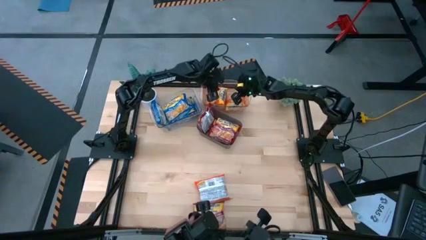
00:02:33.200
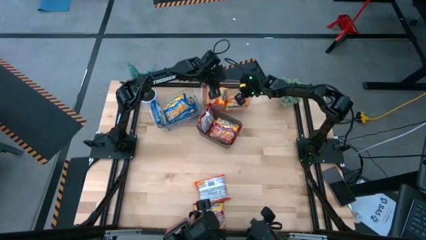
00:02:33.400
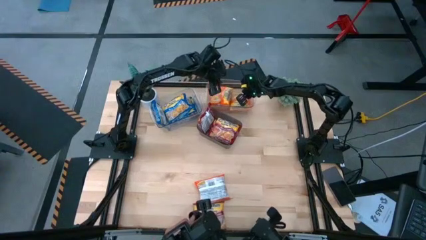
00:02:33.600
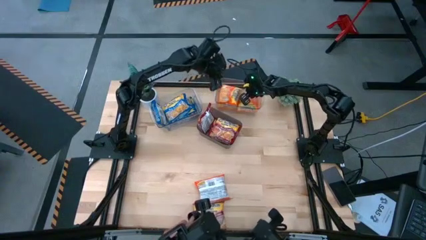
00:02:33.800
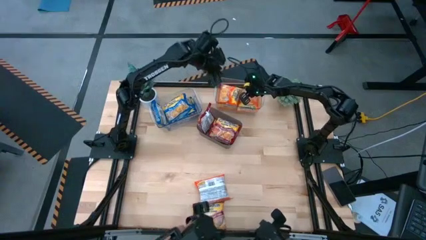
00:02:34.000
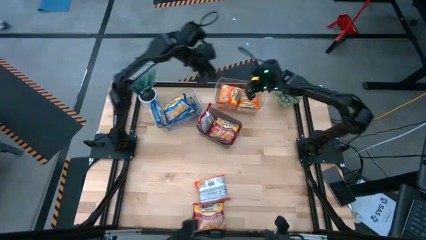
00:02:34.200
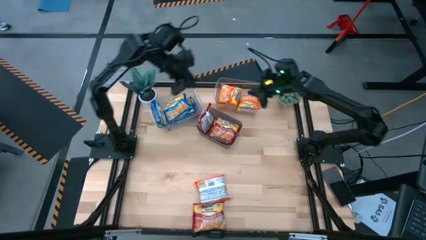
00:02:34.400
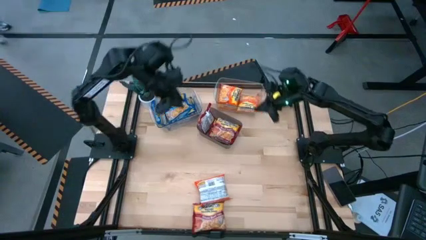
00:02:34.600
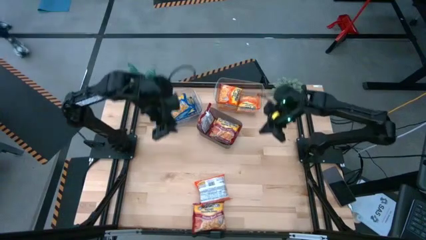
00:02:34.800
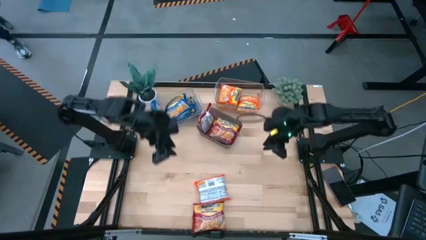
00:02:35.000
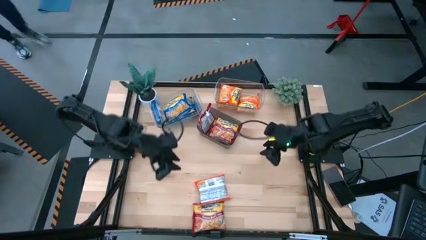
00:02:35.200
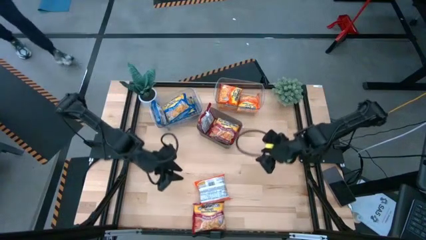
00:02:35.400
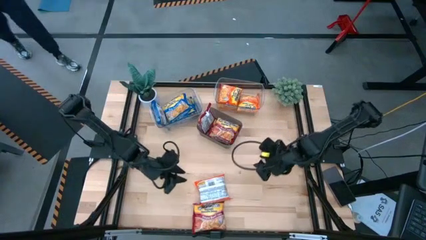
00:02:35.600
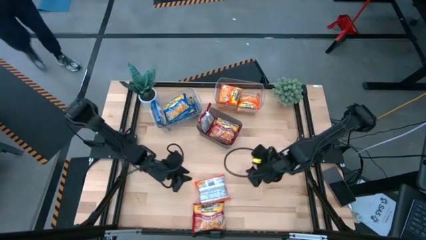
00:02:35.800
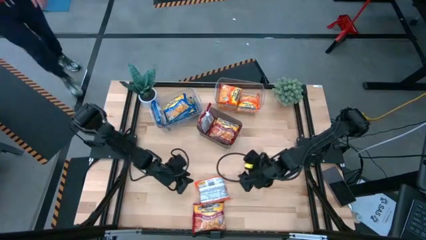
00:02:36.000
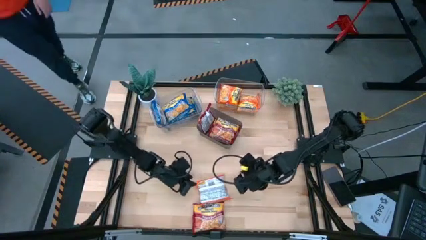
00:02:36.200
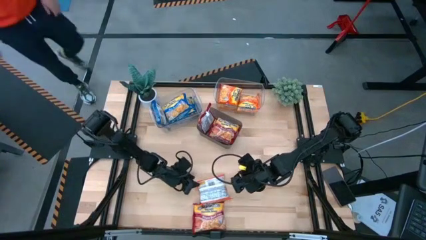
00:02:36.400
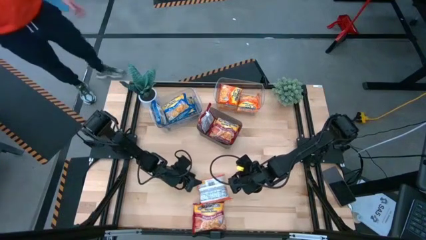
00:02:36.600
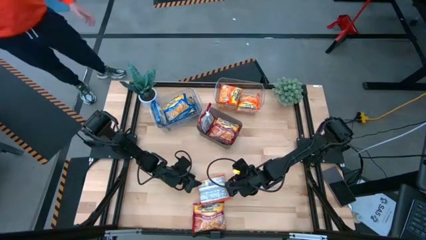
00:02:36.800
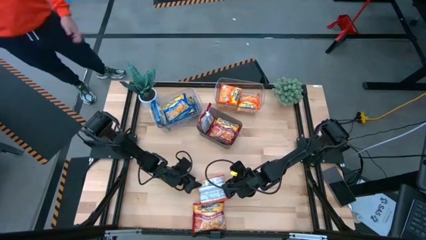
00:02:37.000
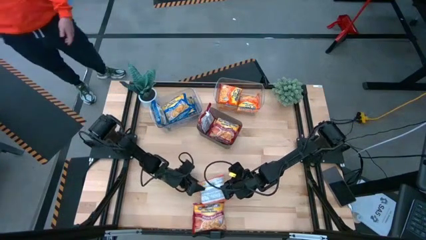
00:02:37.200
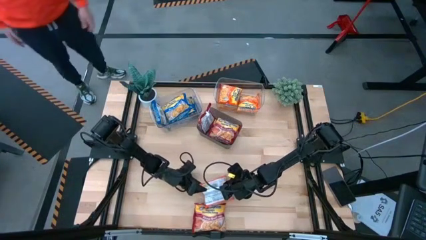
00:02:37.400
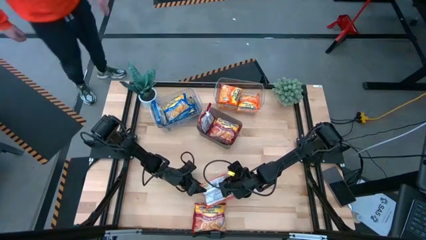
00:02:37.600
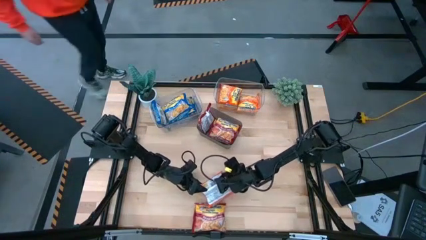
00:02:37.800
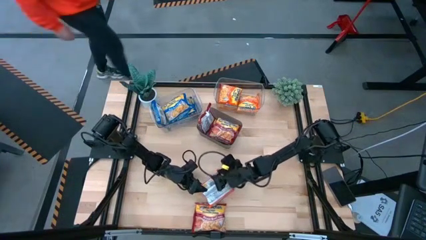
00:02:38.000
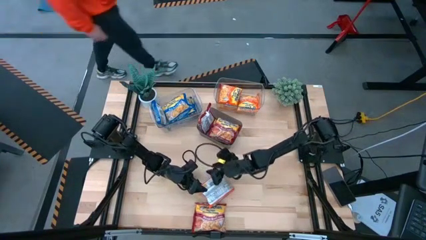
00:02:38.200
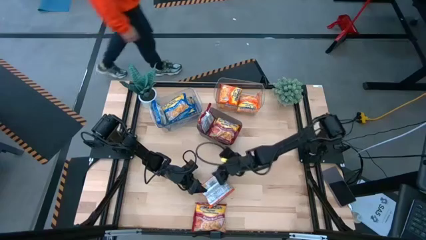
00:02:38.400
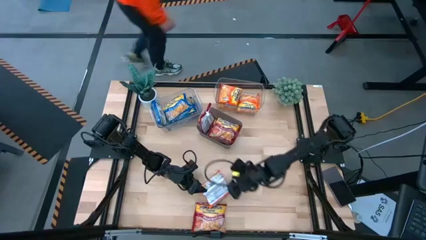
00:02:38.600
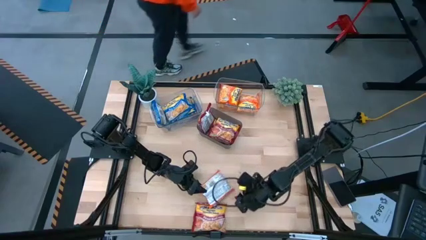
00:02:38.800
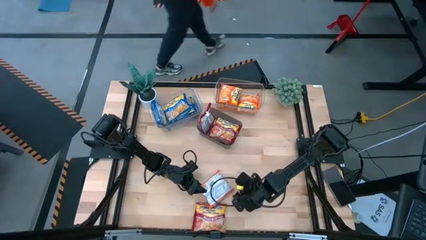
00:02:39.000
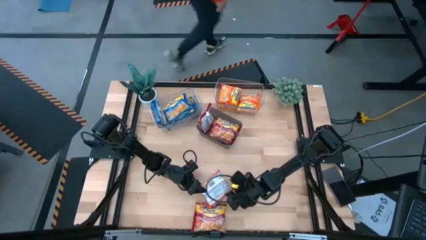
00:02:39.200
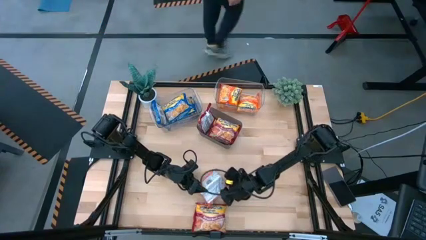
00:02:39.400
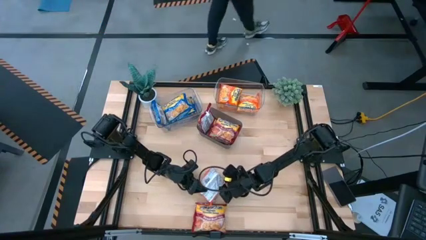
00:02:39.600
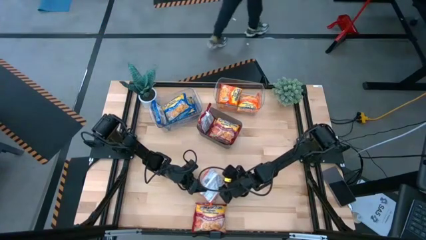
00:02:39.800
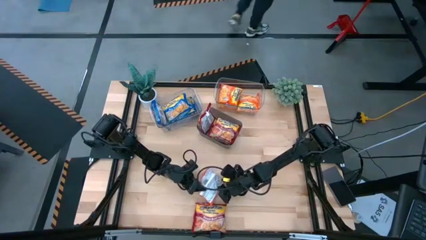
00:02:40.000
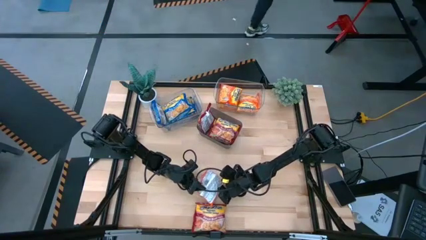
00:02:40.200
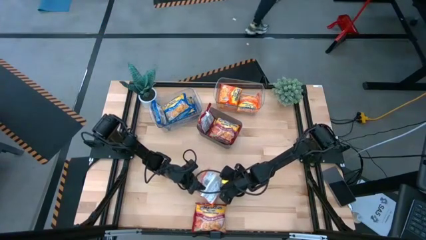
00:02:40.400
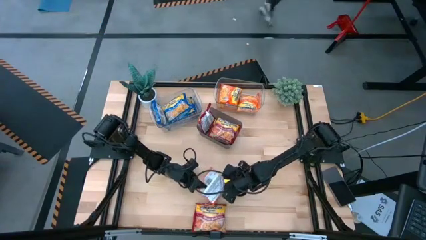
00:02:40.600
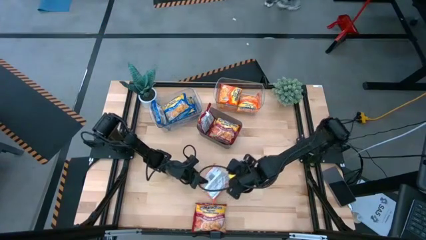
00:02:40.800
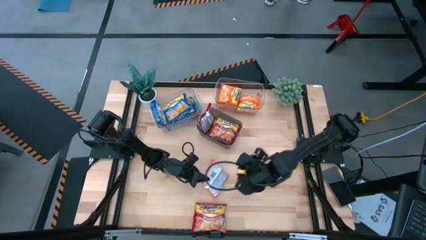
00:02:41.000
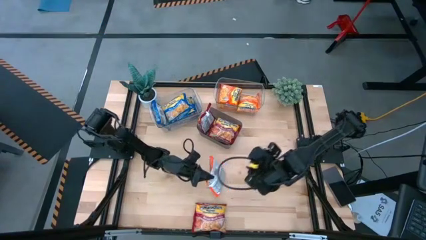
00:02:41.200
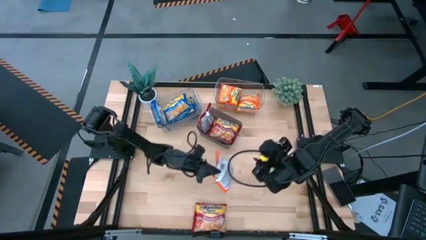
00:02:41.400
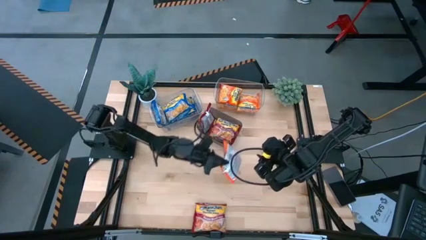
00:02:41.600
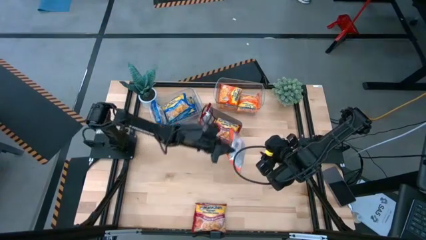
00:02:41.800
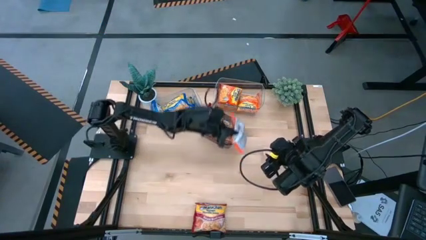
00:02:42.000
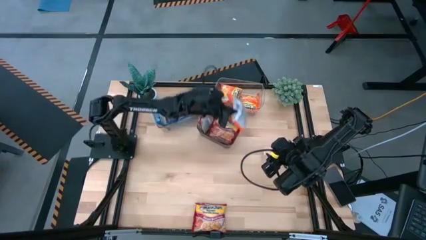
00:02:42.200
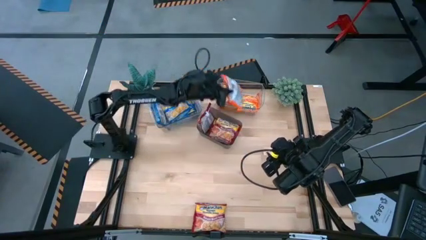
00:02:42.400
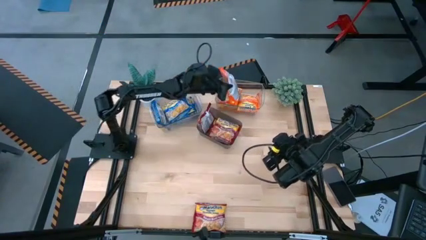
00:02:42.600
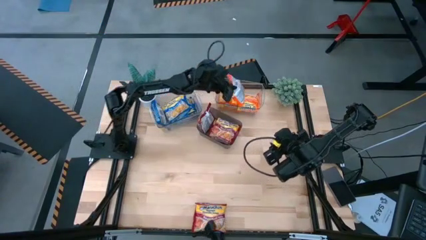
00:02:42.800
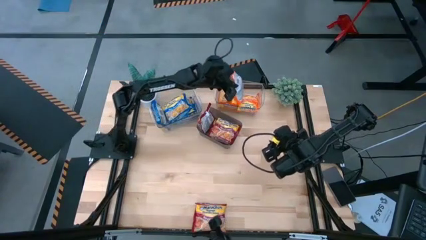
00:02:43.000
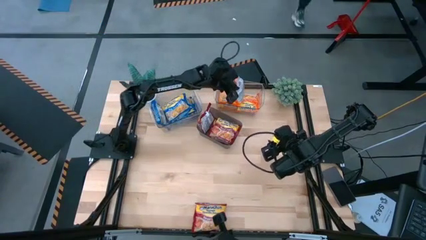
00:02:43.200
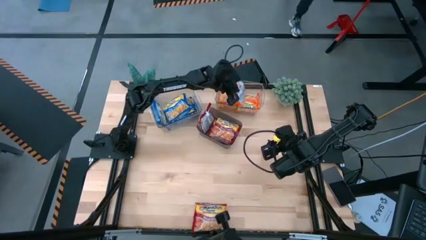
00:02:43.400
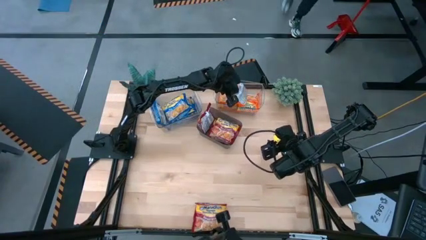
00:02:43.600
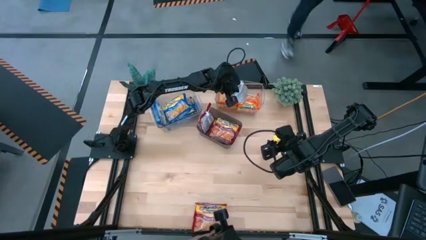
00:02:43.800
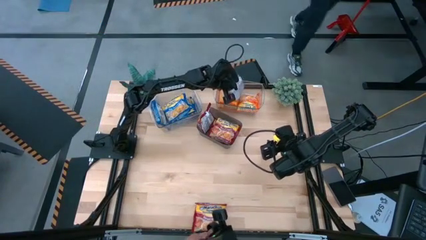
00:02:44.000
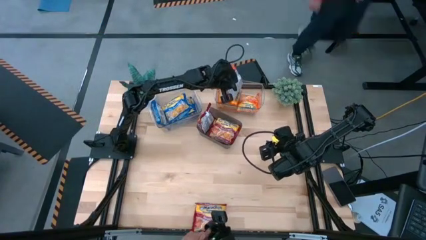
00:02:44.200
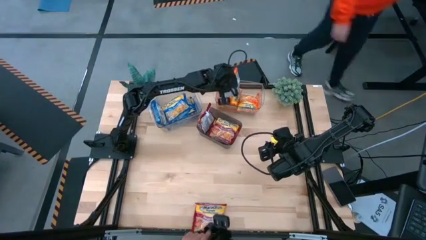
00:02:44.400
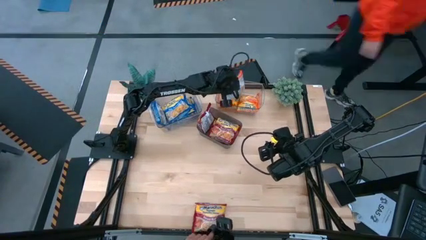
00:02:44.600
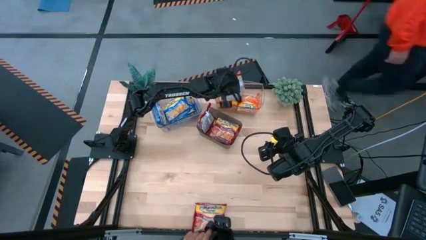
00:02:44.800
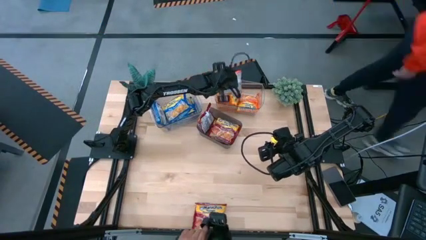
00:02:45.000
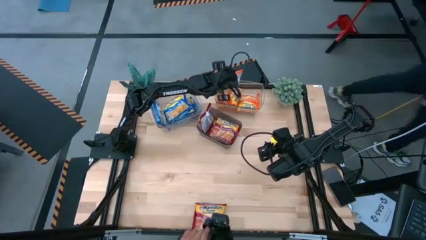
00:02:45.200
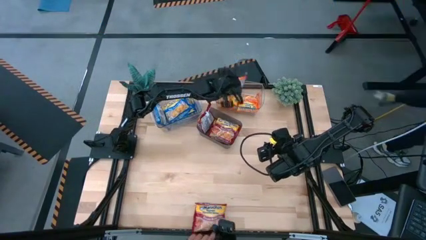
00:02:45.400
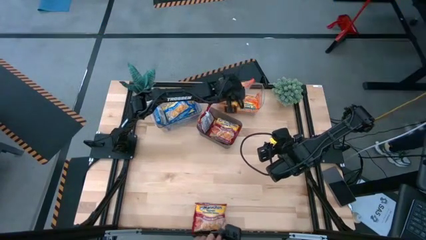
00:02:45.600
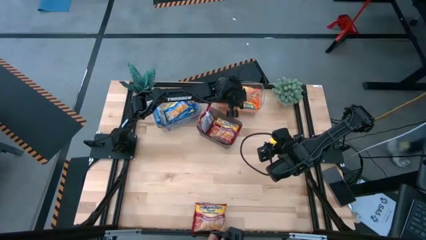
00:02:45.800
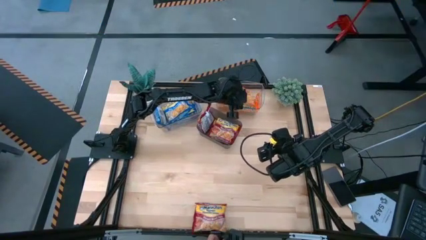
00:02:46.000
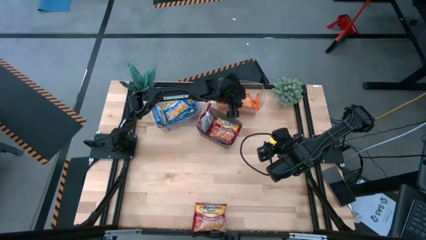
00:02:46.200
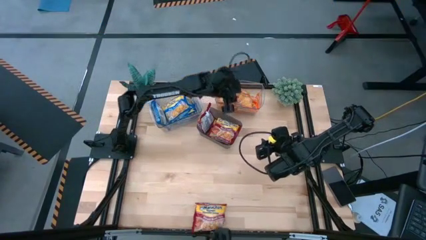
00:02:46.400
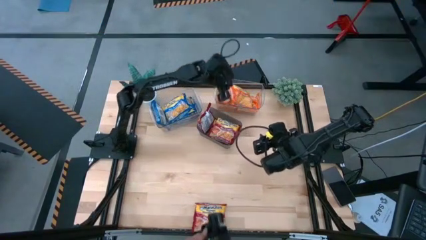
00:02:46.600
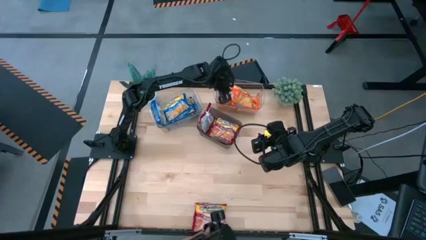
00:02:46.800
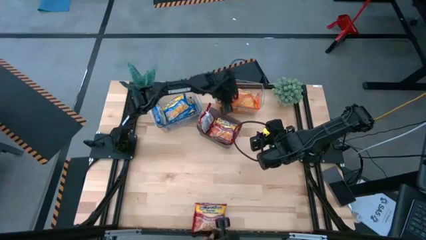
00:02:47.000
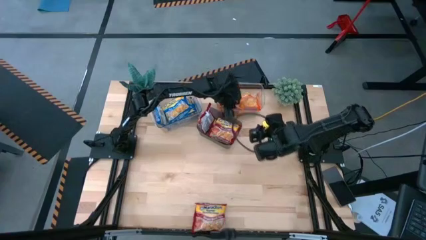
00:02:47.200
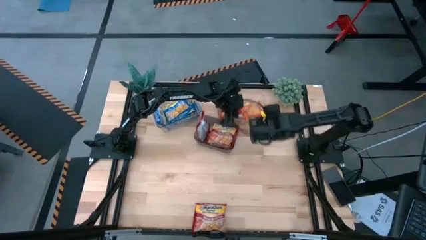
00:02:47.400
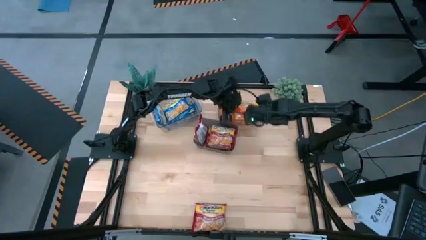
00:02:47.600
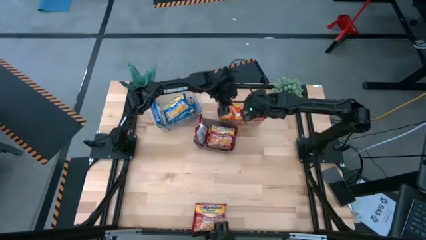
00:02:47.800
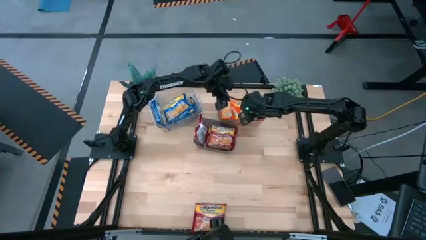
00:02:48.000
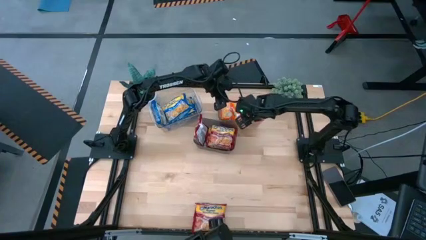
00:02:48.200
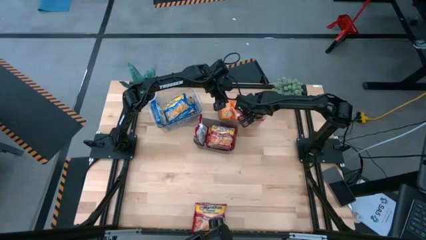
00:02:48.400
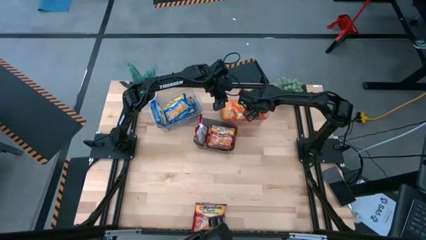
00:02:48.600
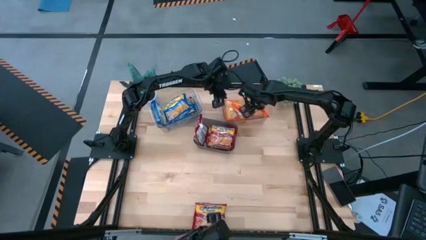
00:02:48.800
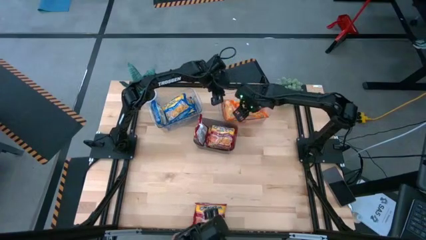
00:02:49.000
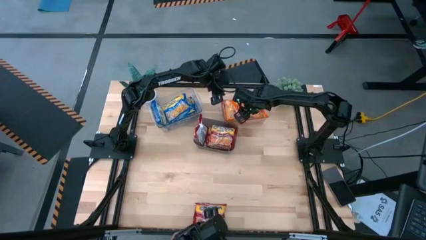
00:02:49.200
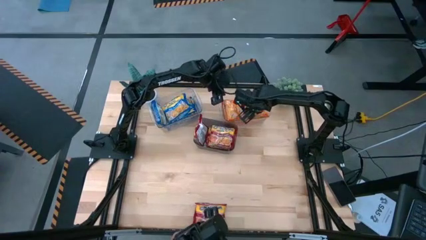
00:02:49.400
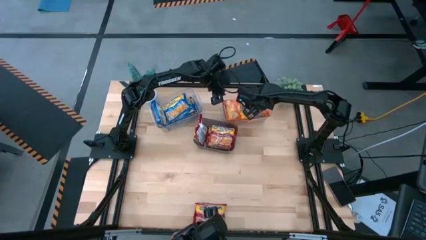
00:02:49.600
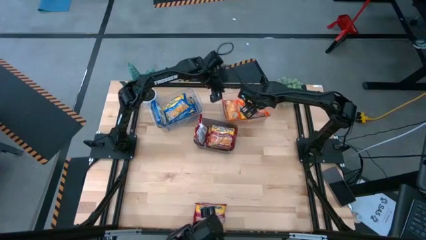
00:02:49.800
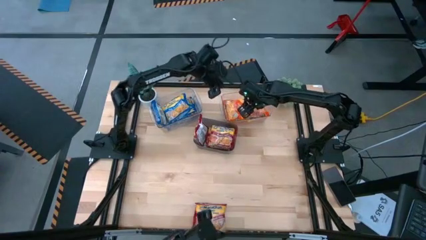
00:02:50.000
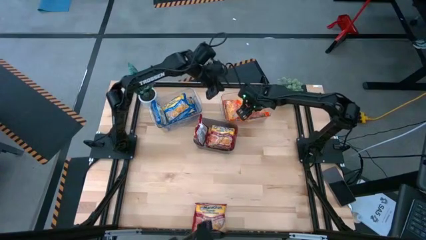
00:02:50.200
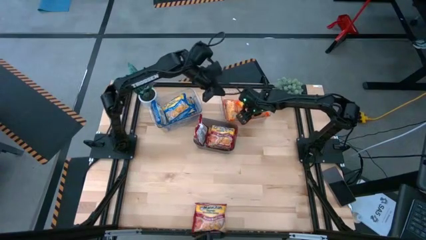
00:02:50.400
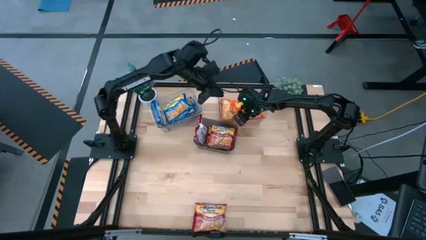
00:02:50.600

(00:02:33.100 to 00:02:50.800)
Task: Sort Maruchan noodles
Stack the orange noodle pack on top of the orange noodle pack
